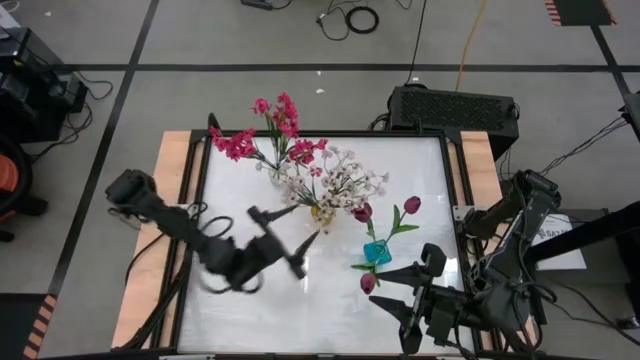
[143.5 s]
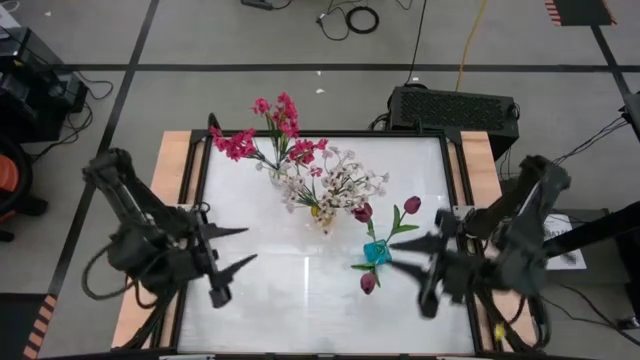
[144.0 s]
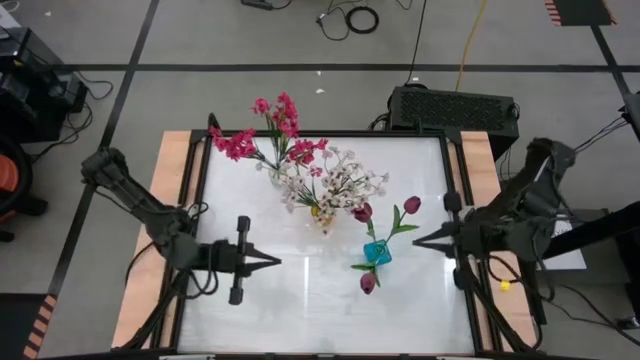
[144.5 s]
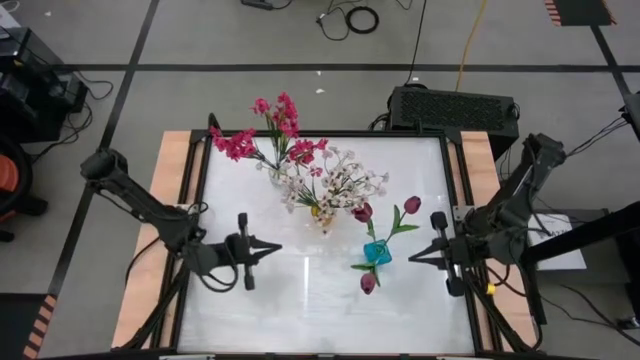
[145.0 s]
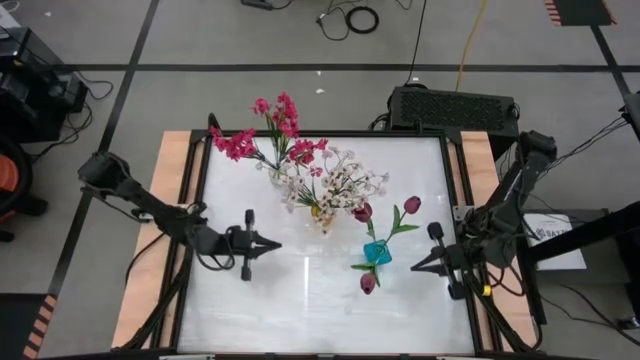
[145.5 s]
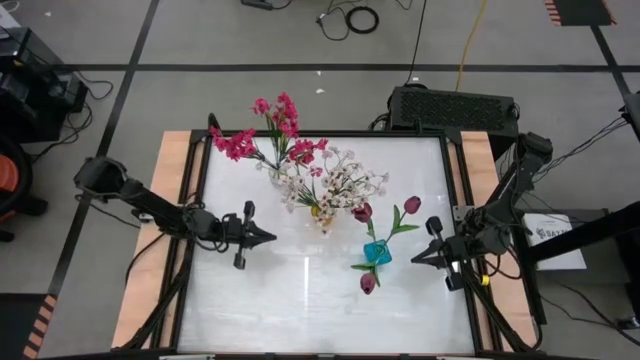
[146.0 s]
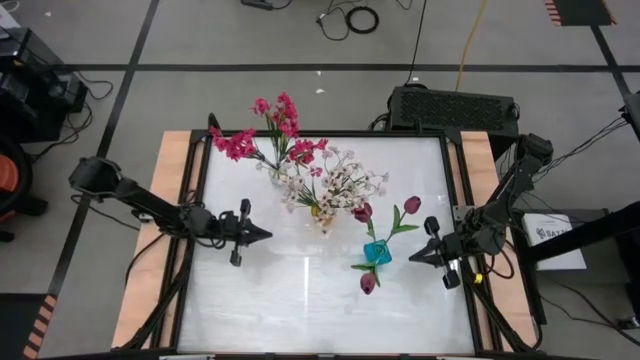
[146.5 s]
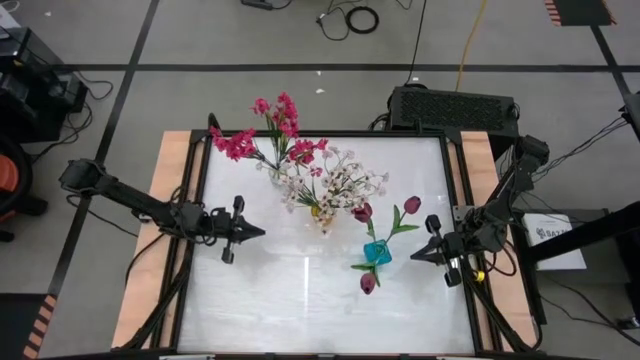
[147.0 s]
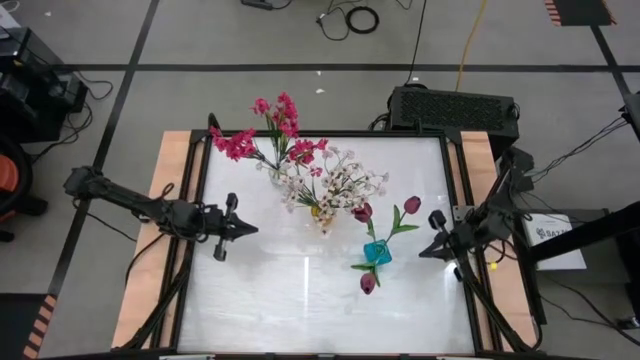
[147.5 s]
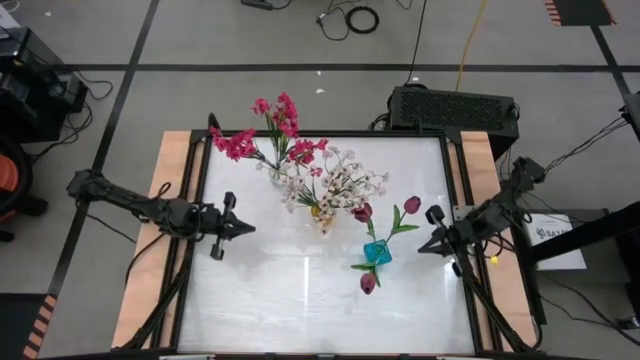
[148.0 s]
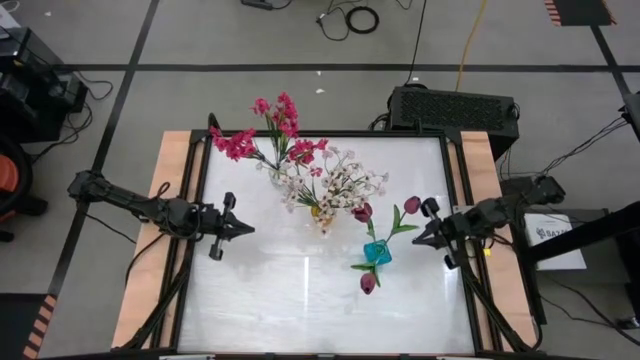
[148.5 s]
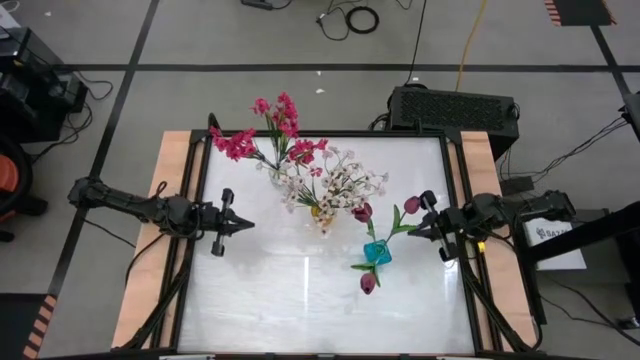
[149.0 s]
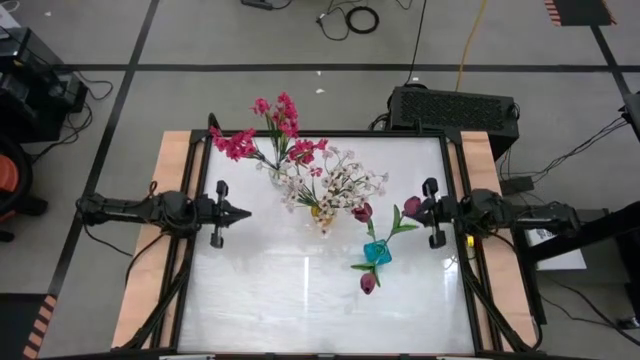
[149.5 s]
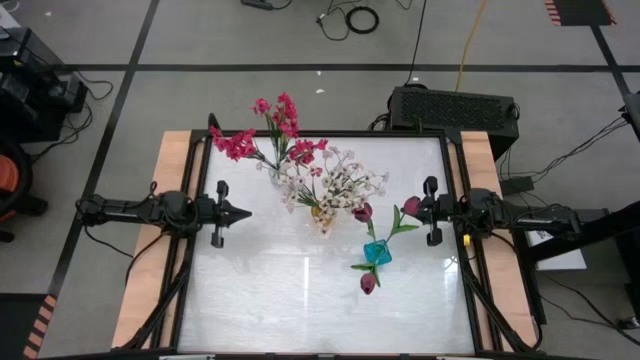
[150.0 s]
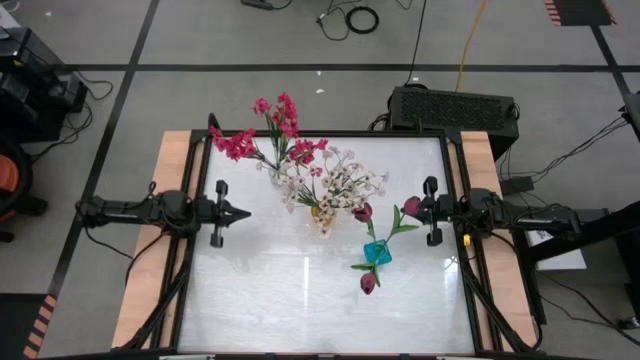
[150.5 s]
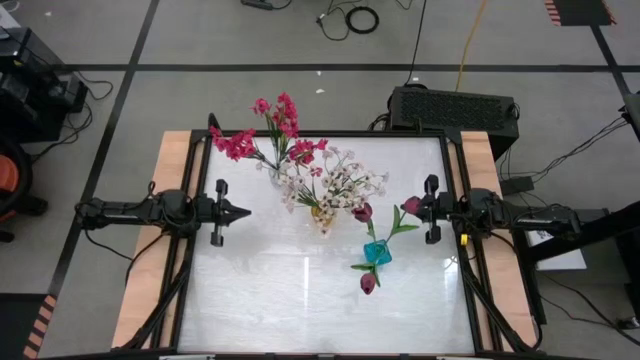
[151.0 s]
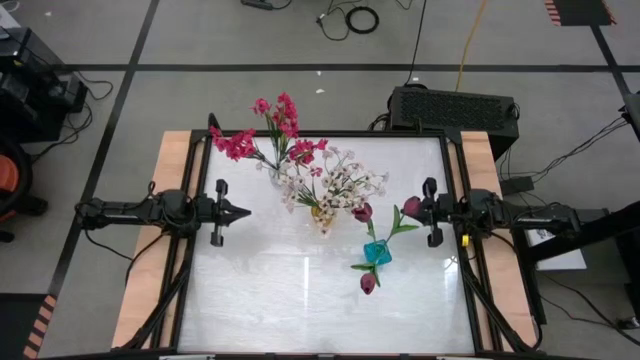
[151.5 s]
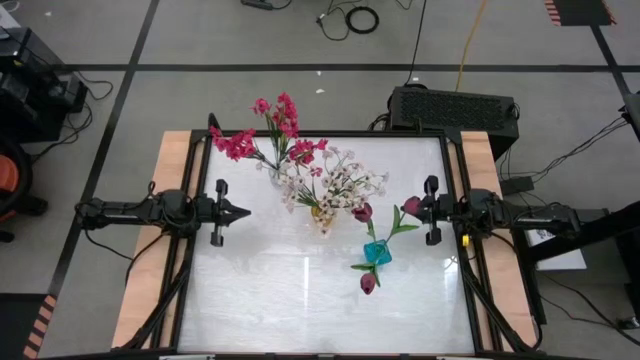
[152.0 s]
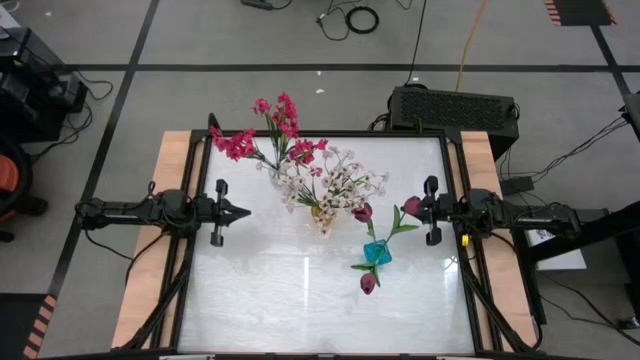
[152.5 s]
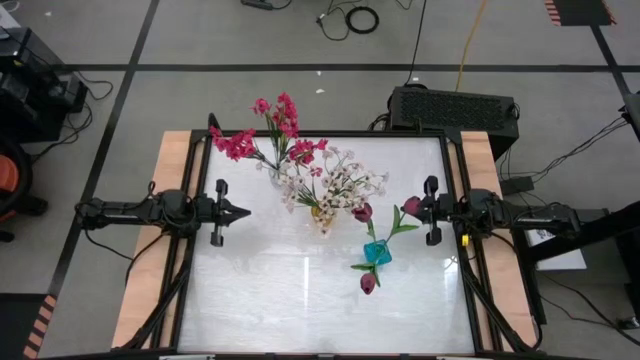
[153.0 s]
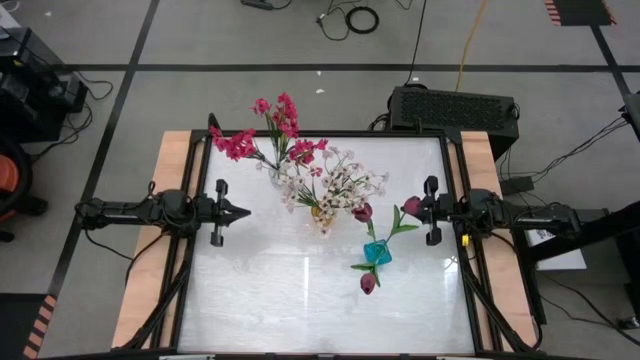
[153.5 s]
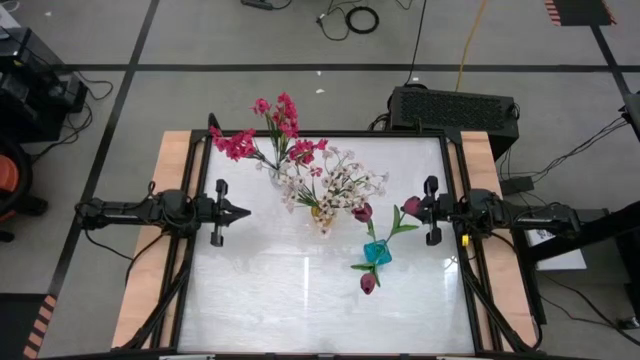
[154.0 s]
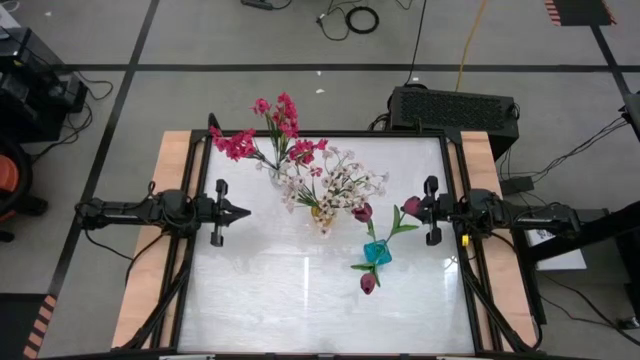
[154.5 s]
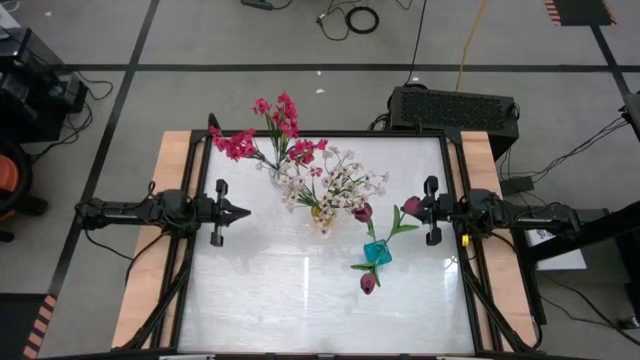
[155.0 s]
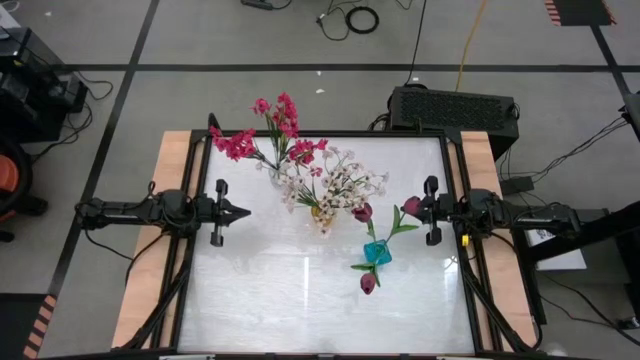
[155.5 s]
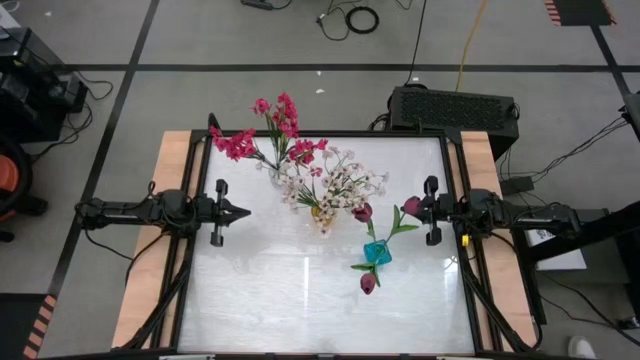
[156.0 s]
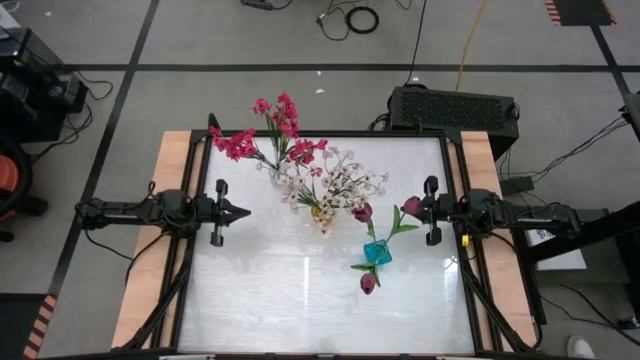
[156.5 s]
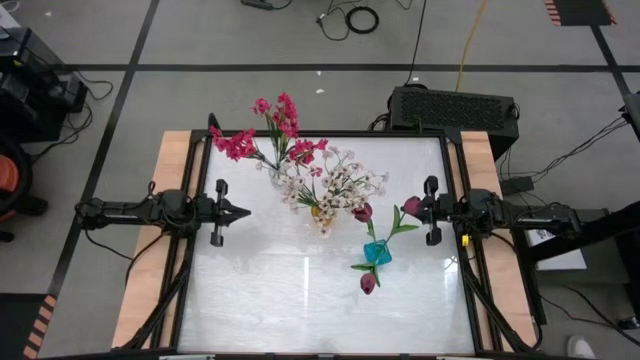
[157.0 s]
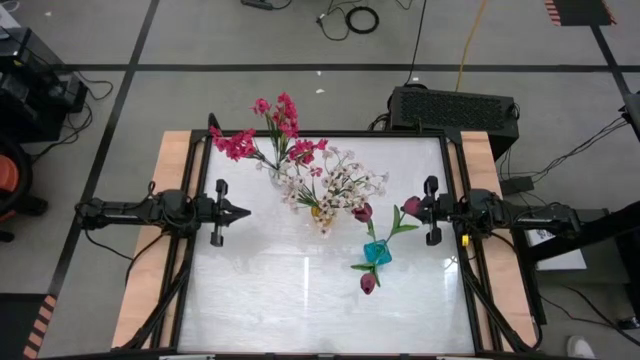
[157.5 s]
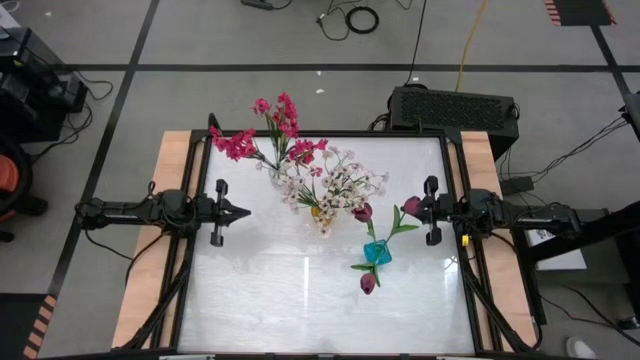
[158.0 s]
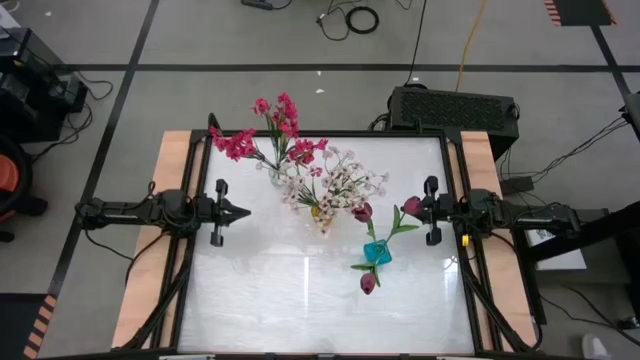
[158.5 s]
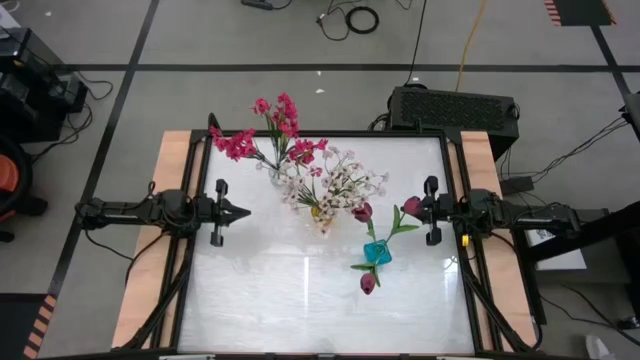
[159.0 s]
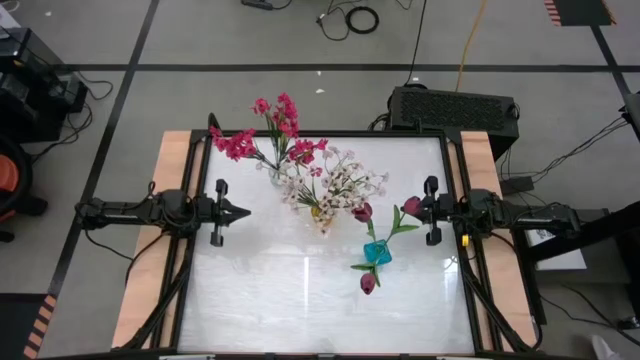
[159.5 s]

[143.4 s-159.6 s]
Task: Sort flowers into vase by color
Return to Home Position

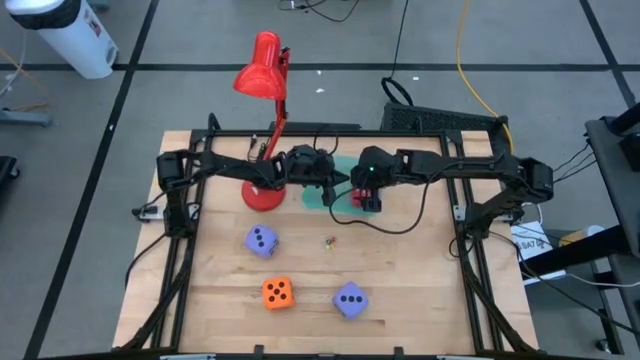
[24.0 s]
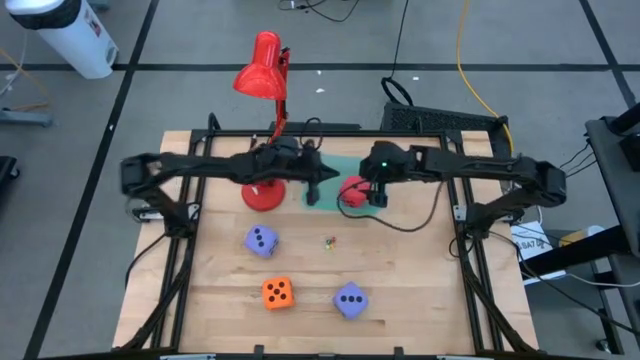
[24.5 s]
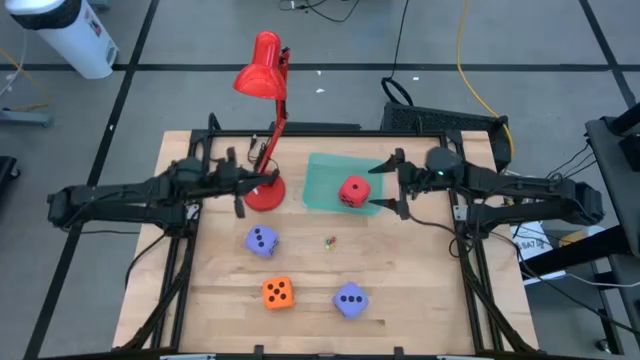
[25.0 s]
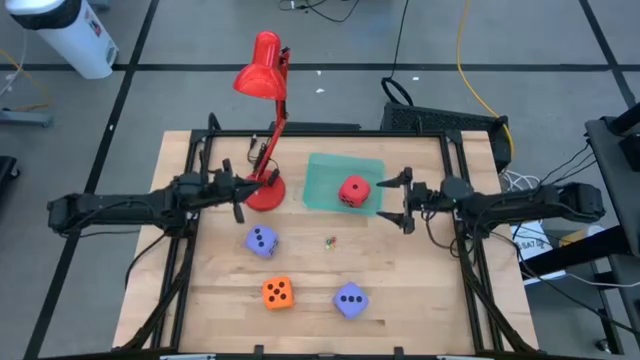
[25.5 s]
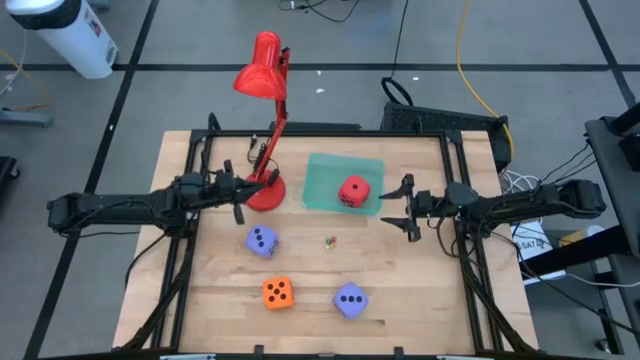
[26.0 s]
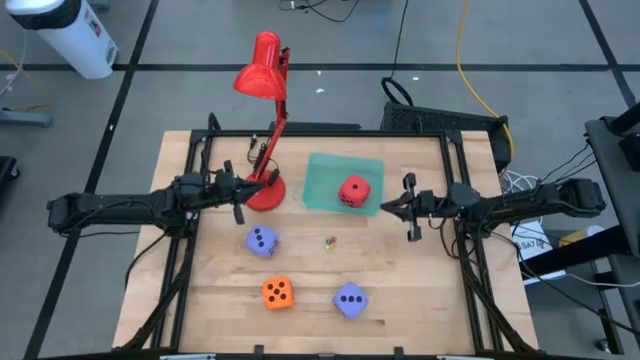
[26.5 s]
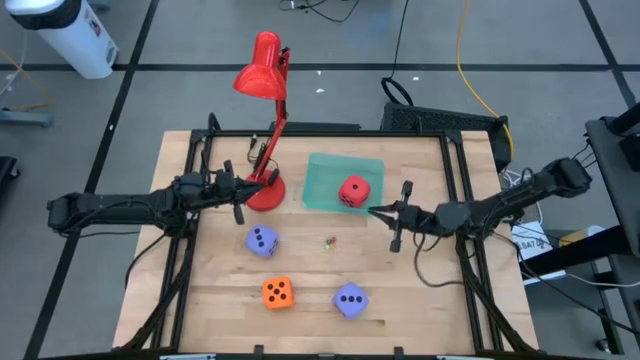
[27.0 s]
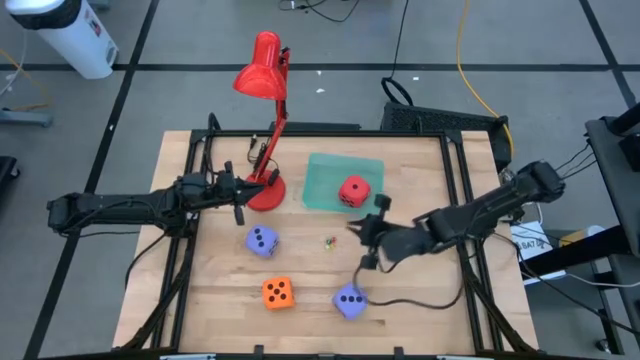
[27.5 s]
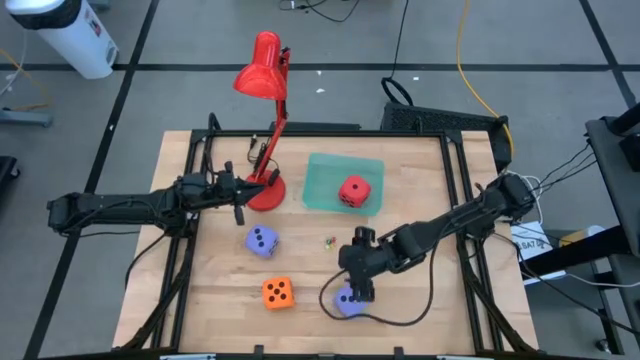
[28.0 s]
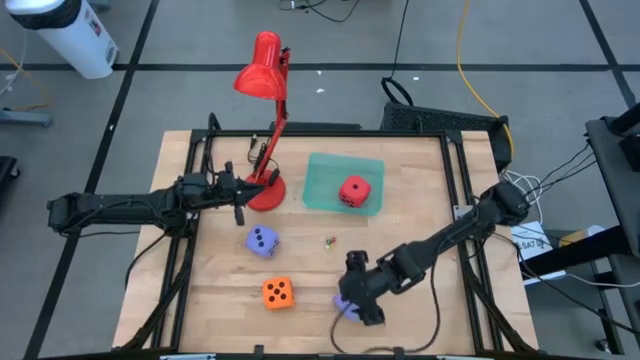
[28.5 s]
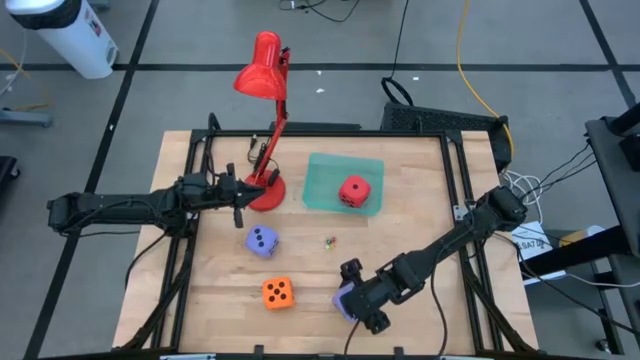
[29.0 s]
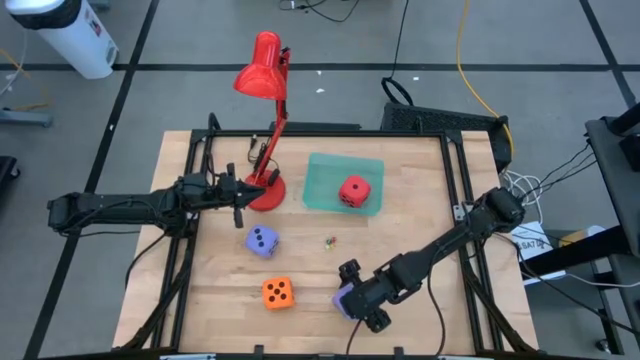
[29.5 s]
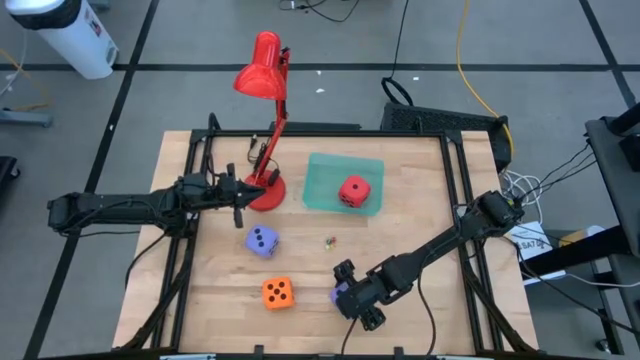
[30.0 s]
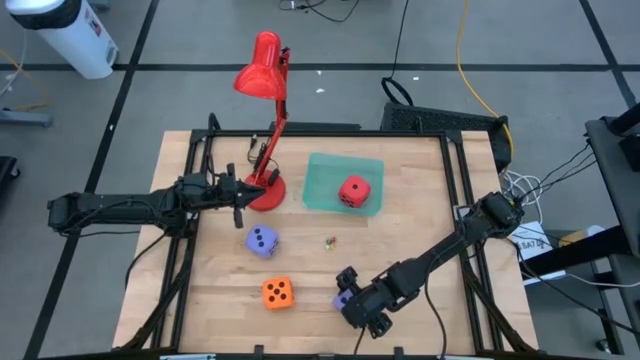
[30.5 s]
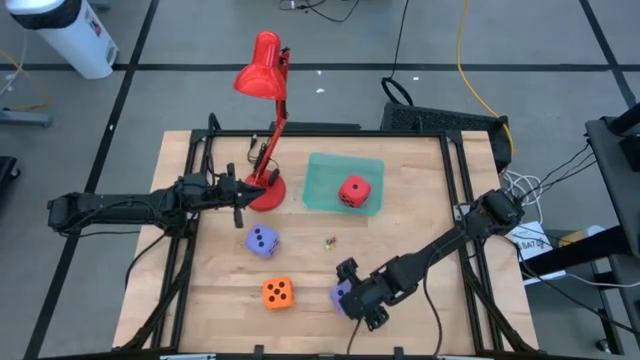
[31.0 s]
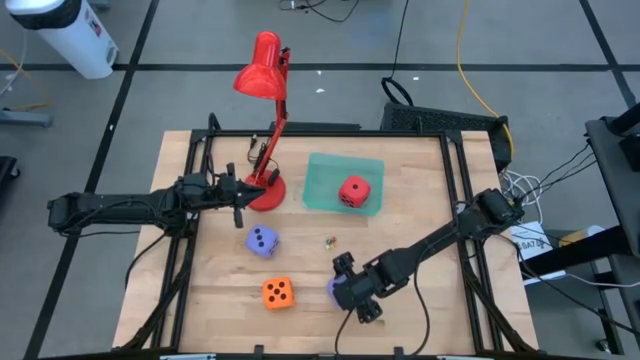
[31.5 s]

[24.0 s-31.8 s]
Task: Pick & Place Dice
Put the bottom large purple die into the blue bin
